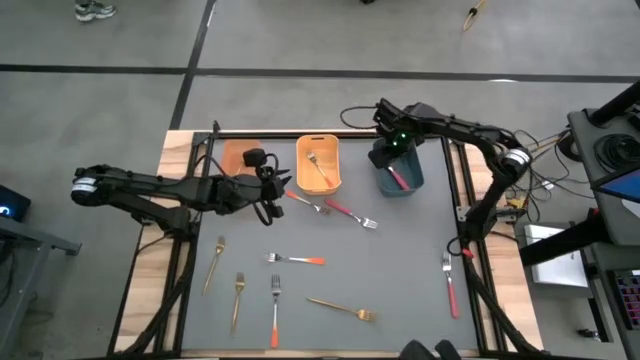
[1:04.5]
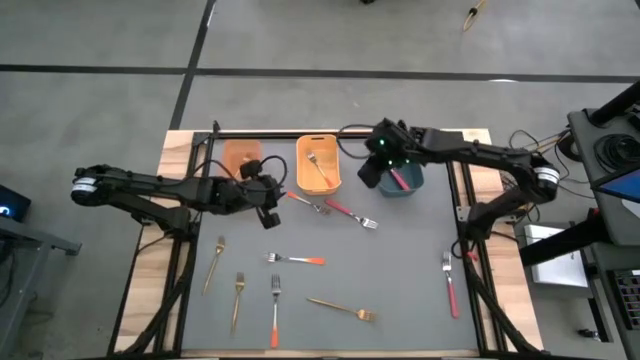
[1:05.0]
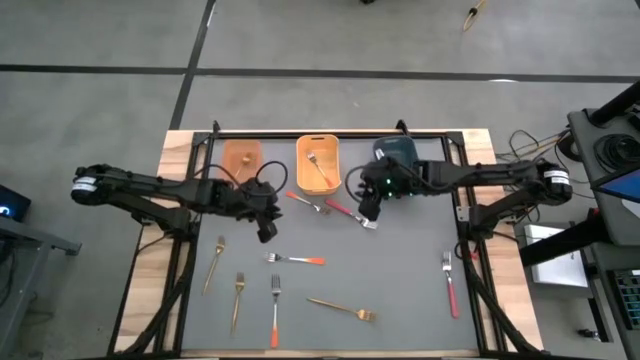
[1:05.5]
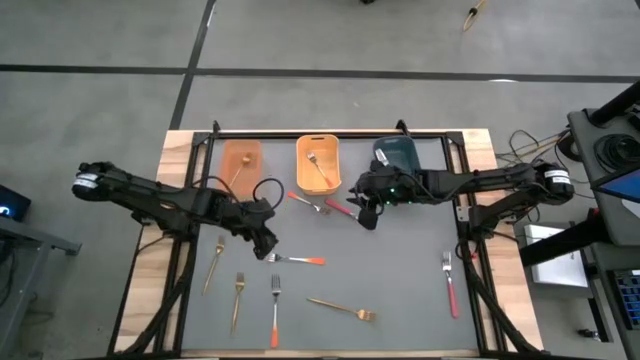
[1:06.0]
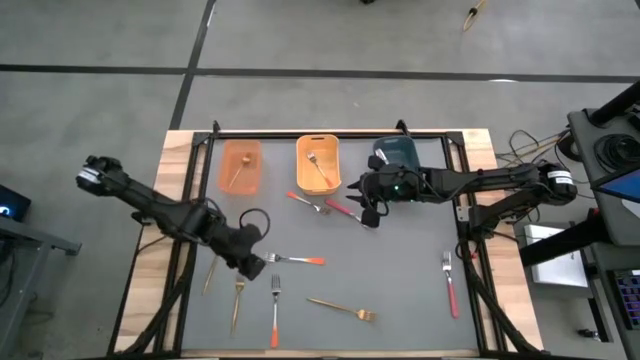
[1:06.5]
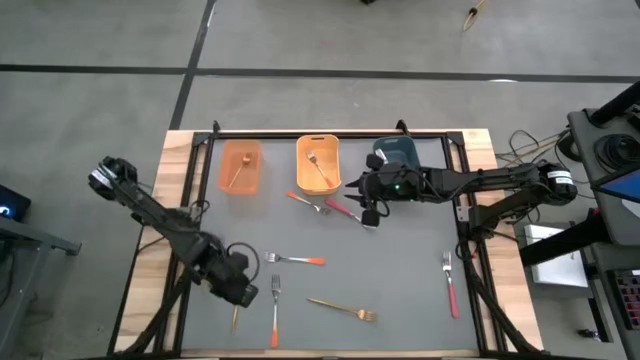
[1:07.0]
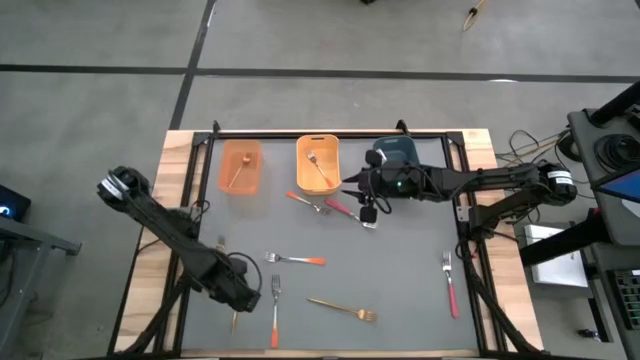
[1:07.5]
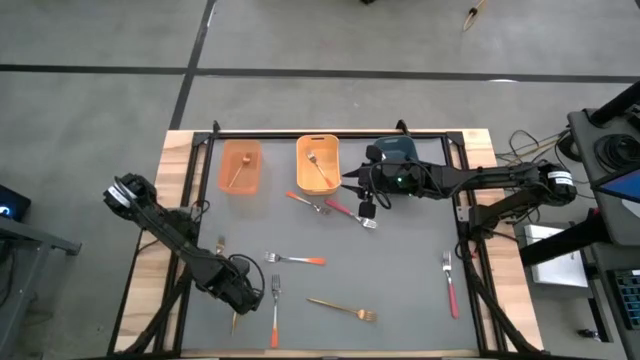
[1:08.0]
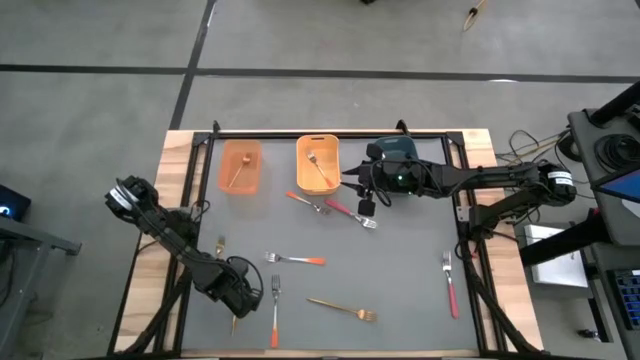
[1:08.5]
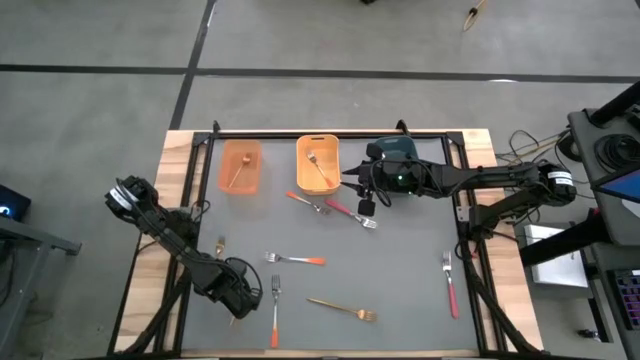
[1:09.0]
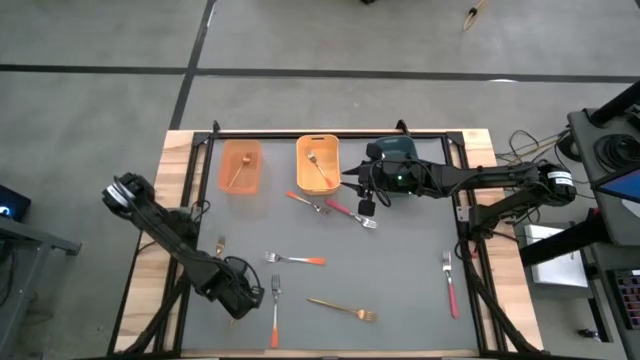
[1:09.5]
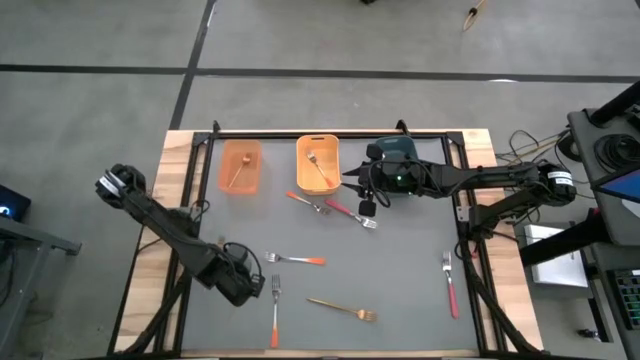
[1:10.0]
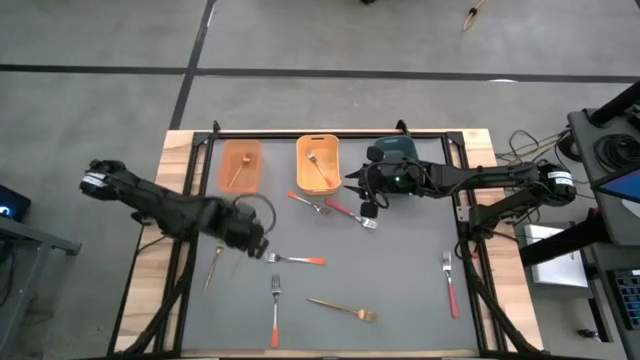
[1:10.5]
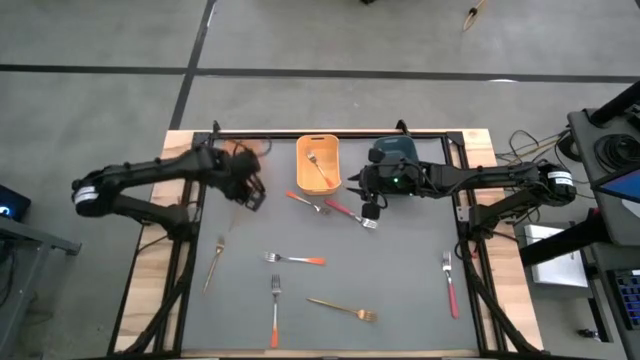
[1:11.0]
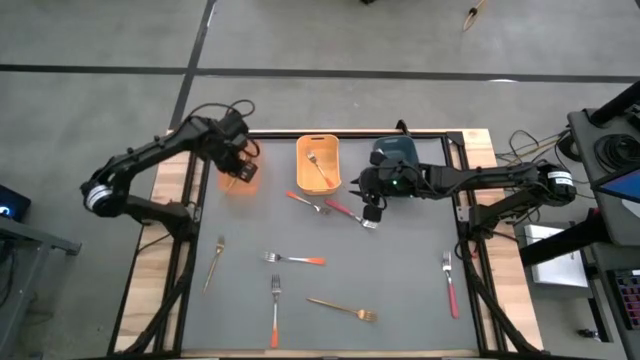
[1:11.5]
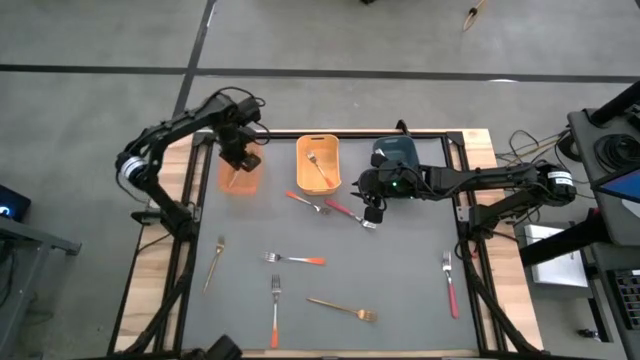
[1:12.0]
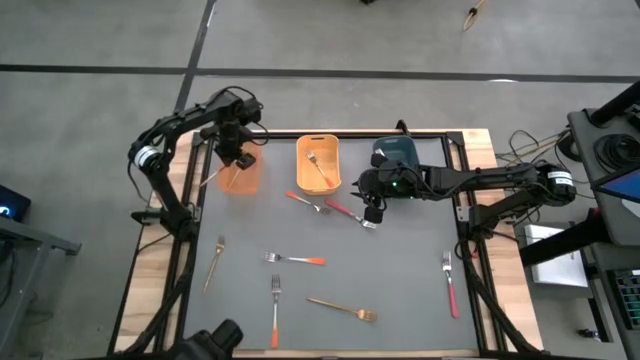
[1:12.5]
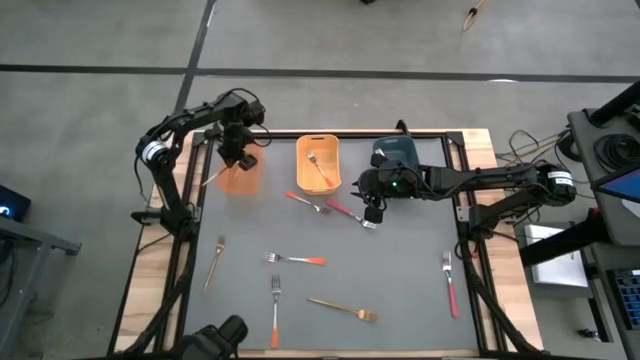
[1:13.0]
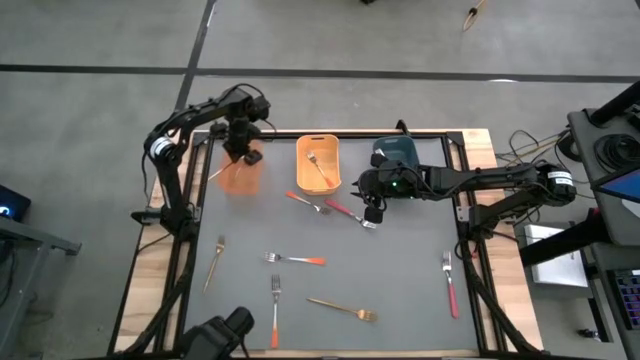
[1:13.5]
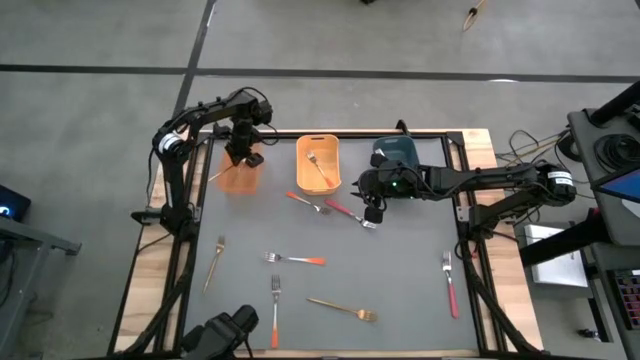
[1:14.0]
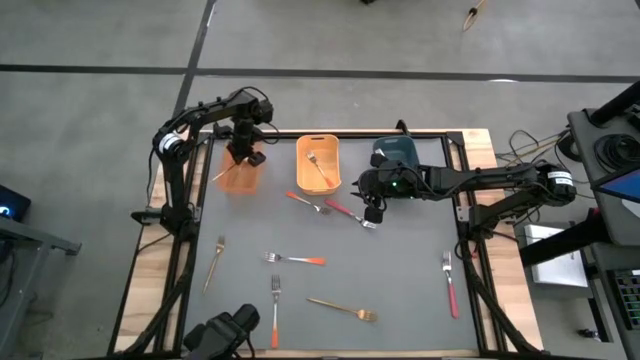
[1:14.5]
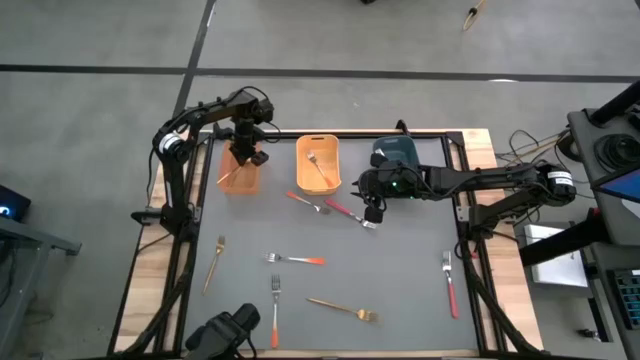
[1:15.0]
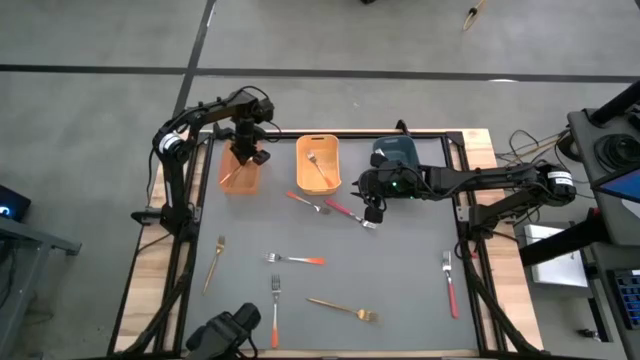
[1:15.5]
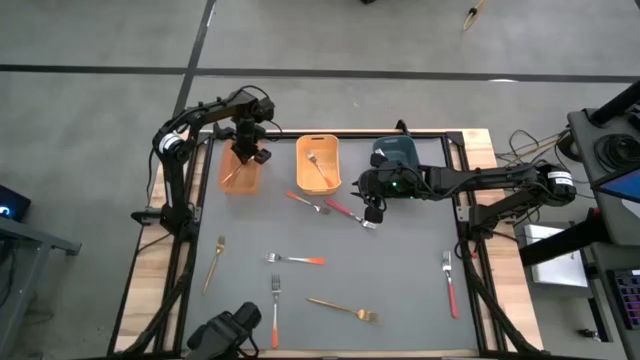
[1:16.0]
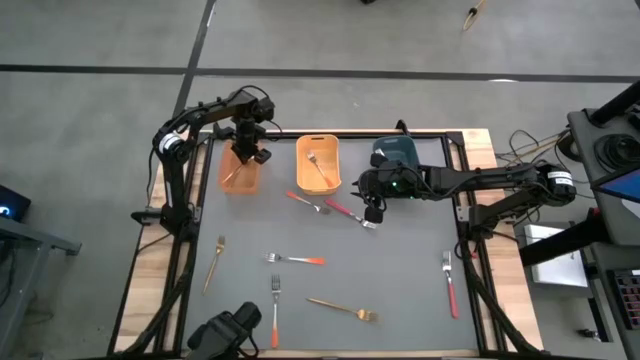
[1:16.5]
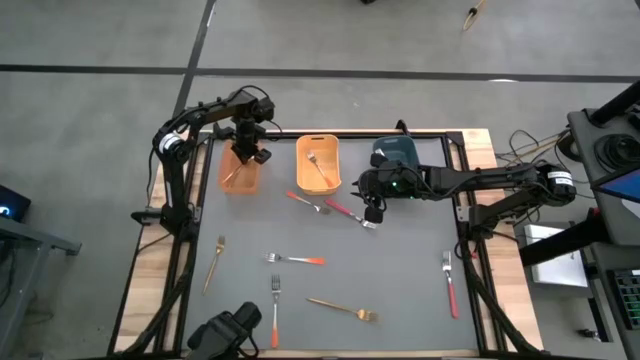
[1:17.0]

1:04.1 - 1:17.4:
Task: Sort silverware by color (type)
Put the gold fork into the orange bin

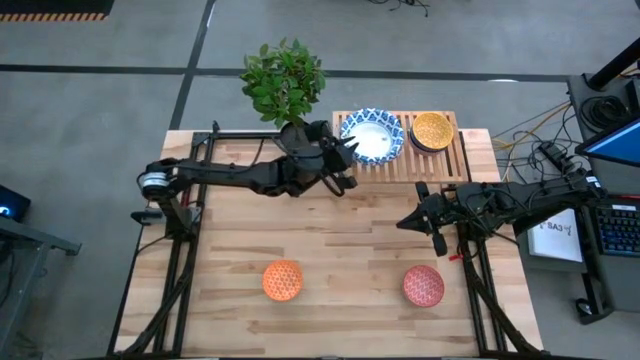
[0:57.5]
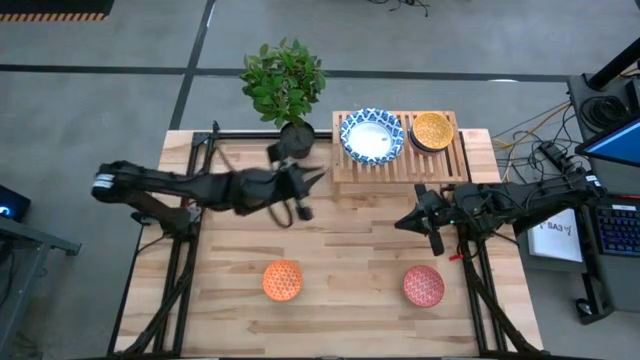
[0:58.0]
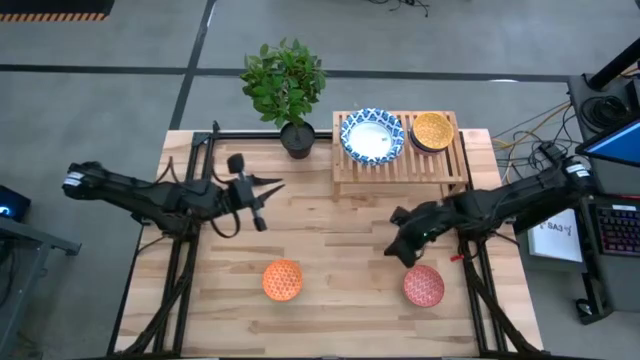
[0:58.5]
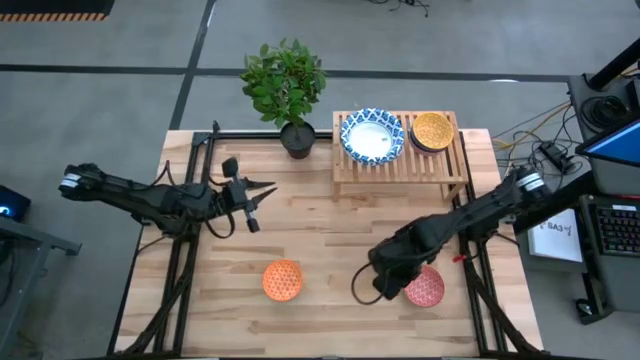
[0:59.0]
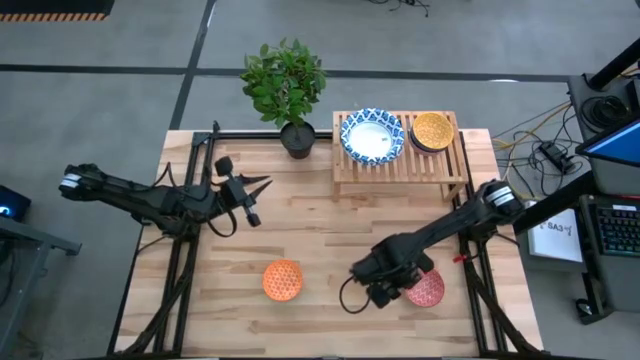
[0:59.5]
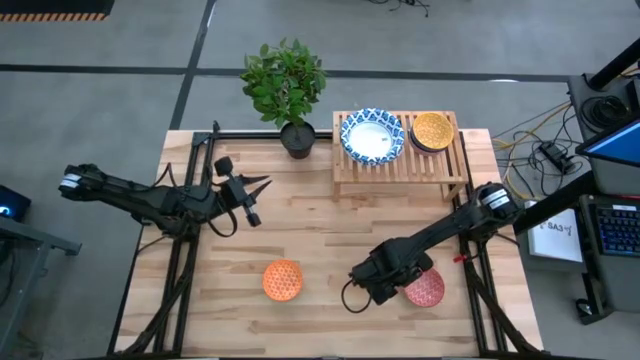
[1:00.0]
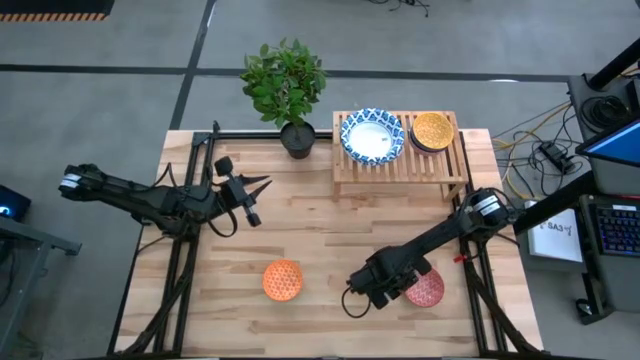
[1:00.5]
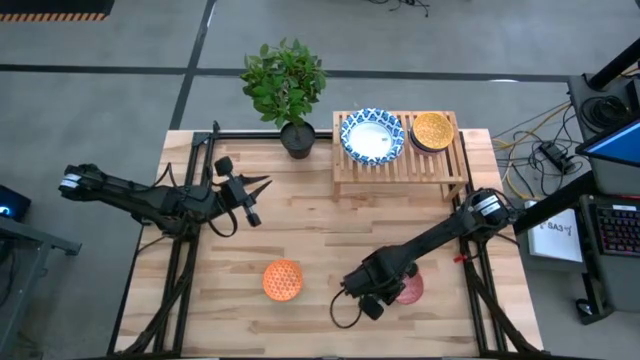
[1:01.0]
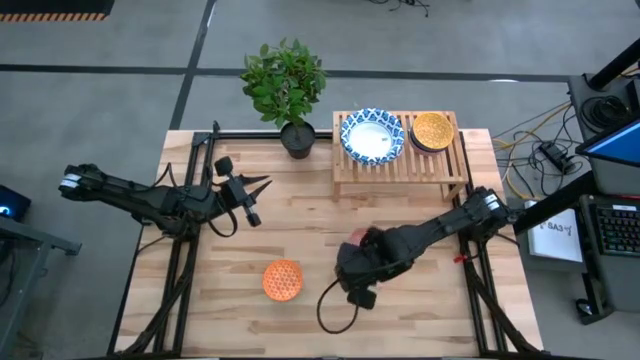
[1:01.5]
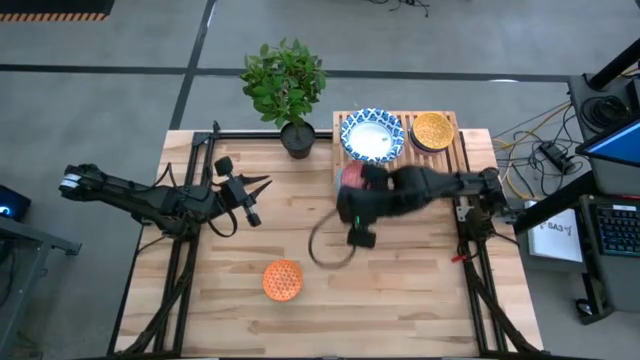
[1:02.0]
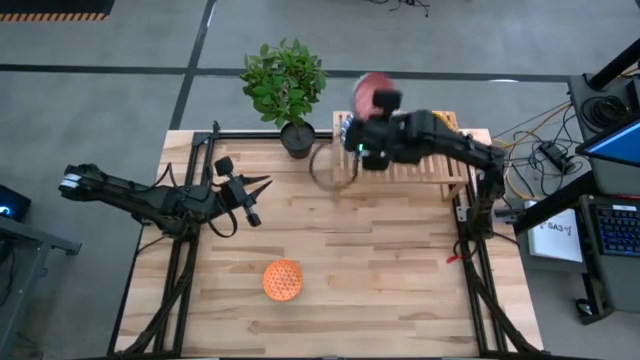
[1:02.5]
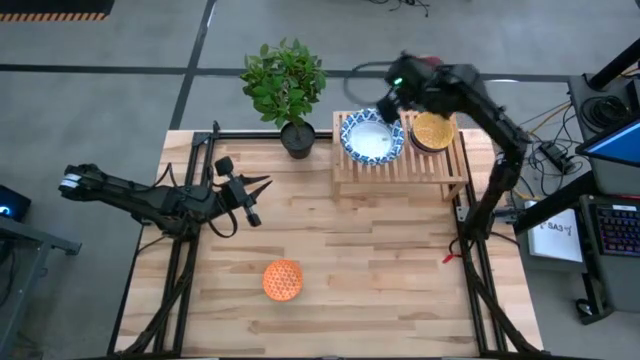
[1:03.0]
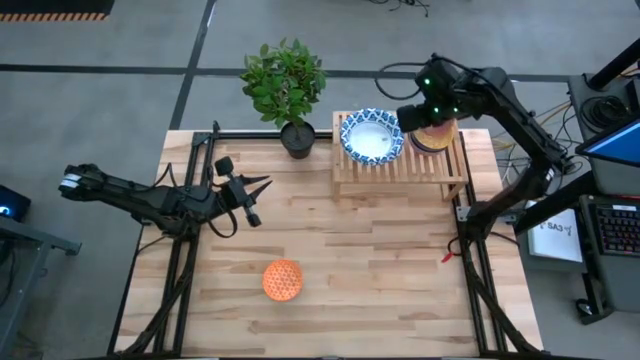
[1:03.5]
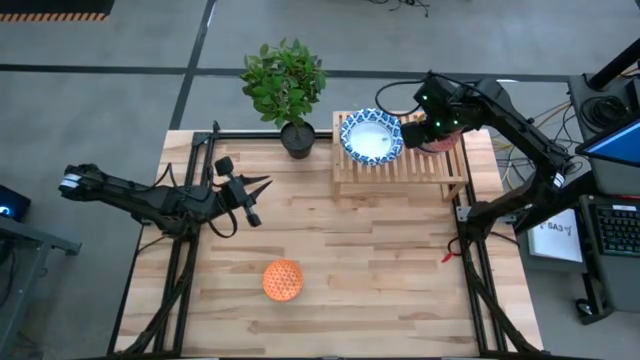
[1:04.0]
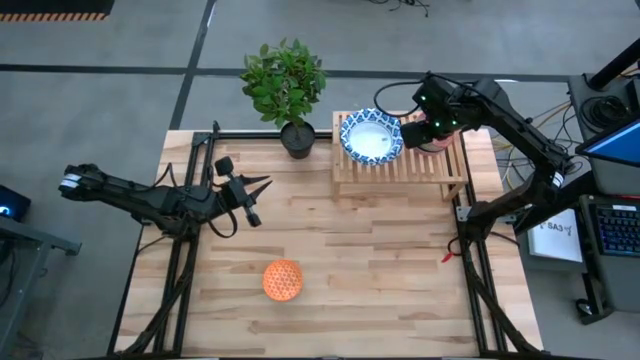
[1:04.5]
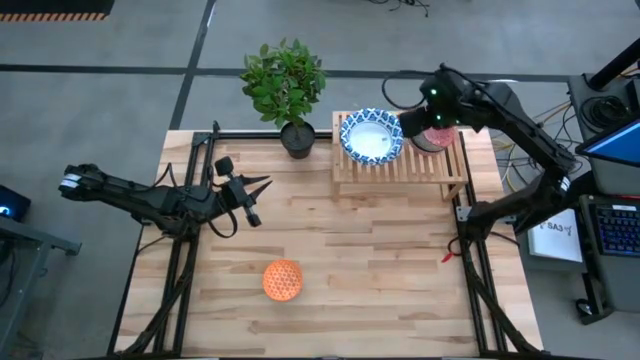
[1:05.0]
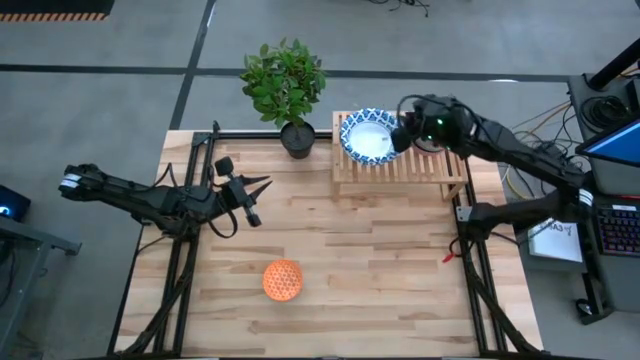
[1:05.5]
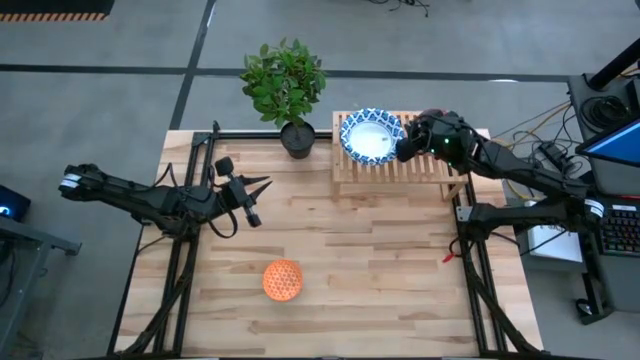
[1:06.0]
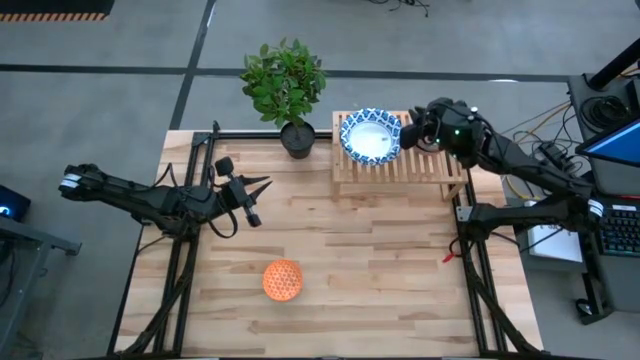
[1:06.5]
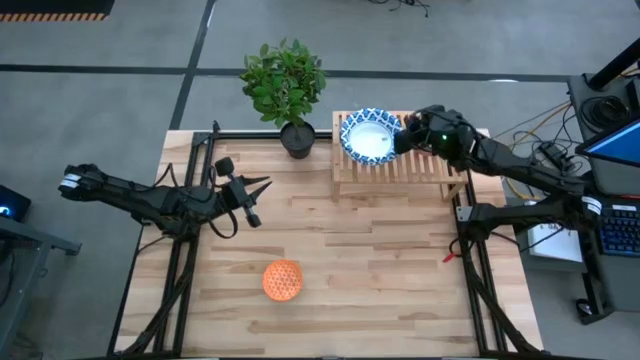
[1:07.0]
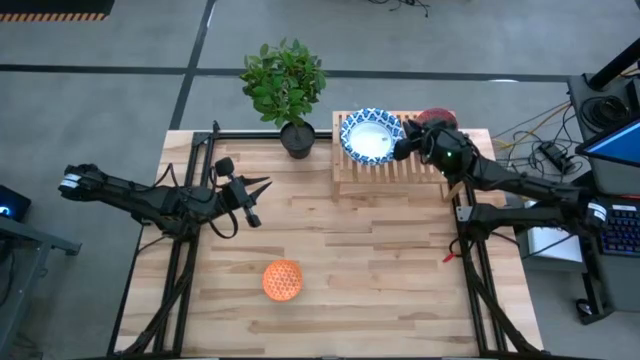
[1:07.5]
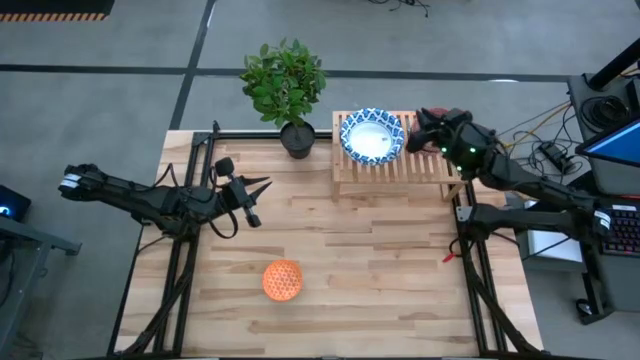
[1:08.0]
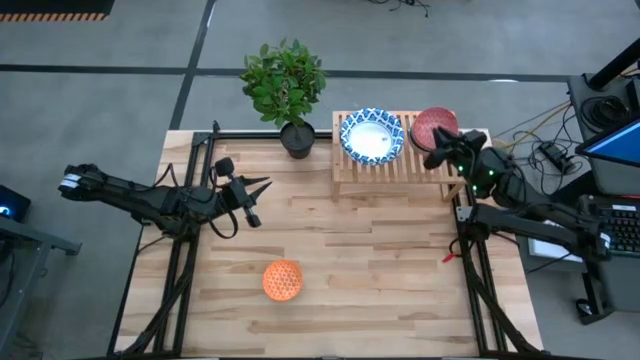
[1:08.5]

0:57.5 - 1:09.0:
Task: Place and stack bowls onto a shelf
Stack the red bowl on top of the yellow bowl on the shelf
